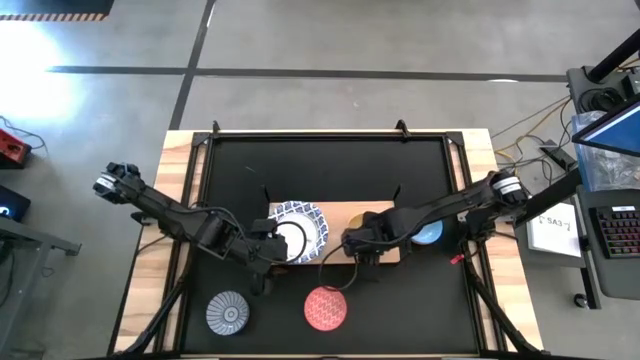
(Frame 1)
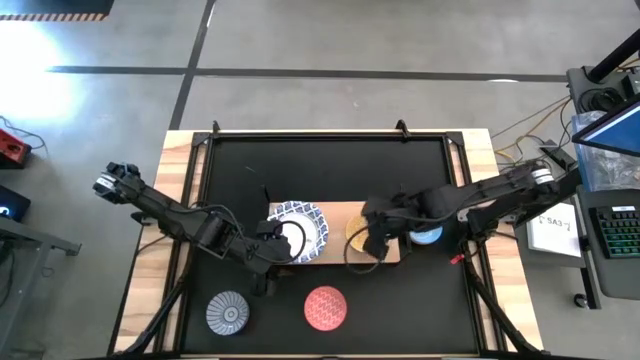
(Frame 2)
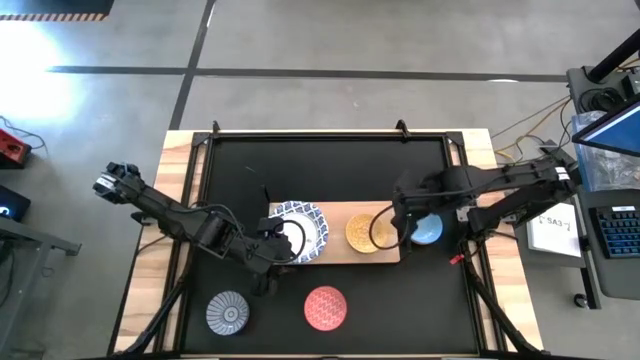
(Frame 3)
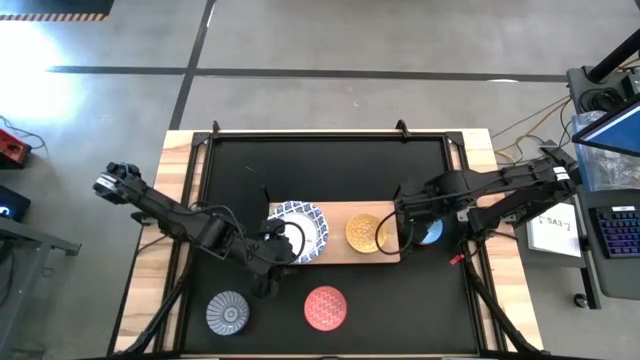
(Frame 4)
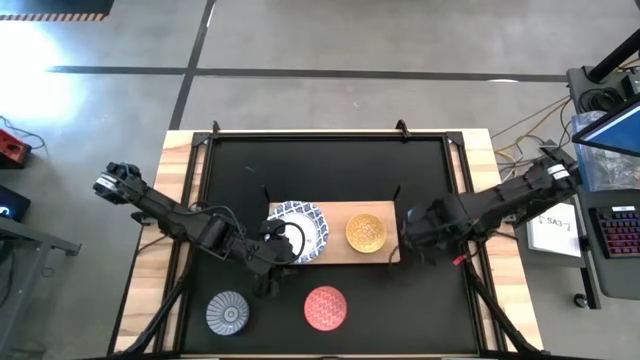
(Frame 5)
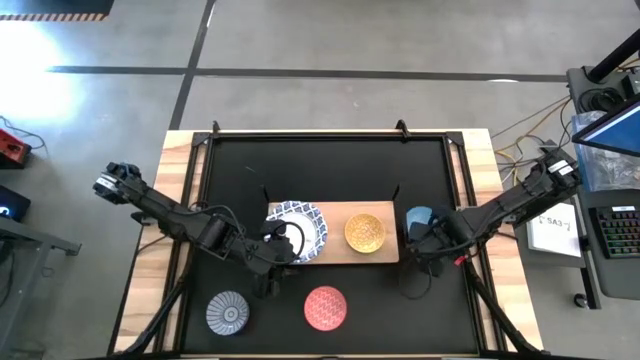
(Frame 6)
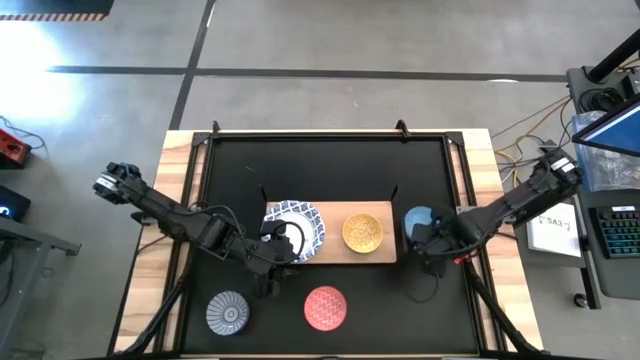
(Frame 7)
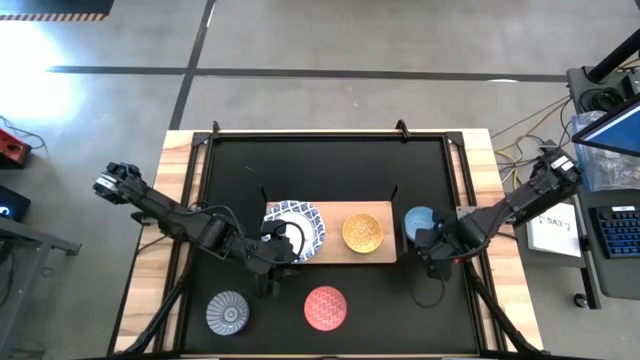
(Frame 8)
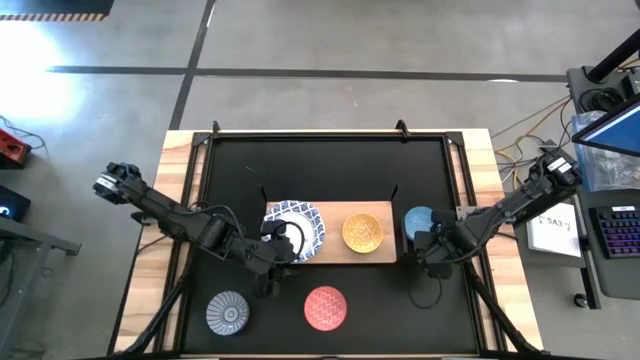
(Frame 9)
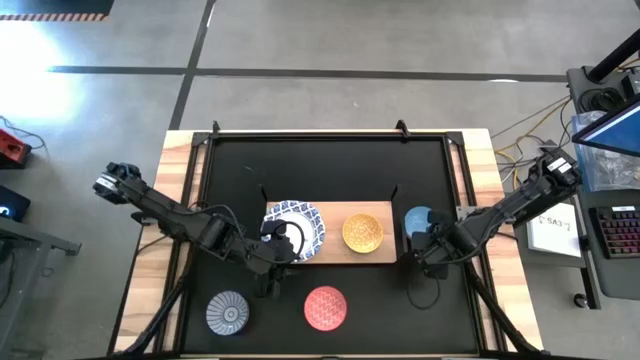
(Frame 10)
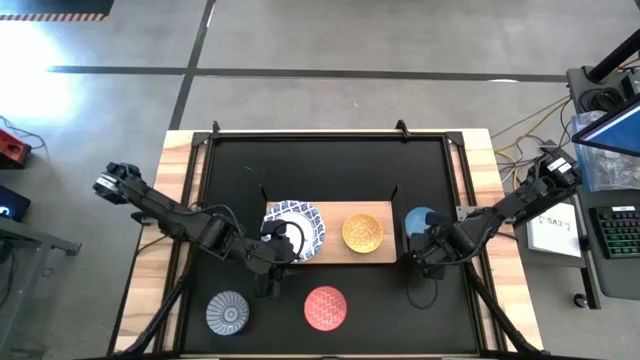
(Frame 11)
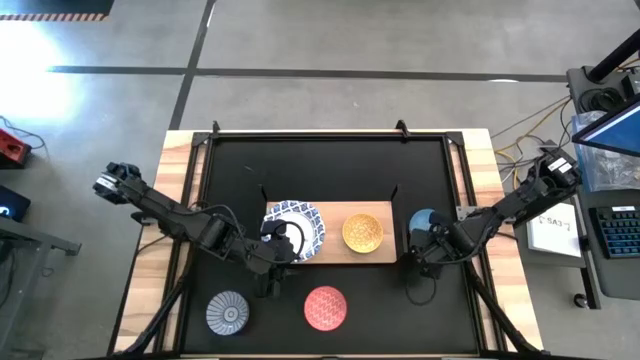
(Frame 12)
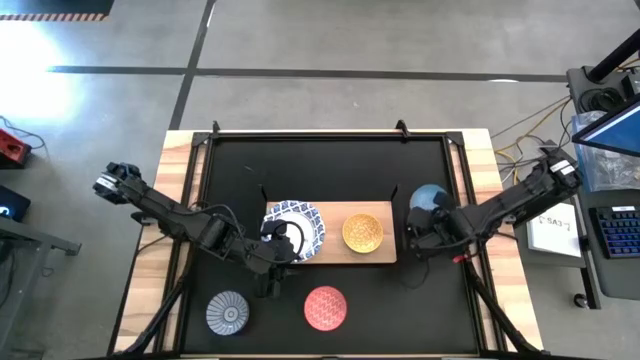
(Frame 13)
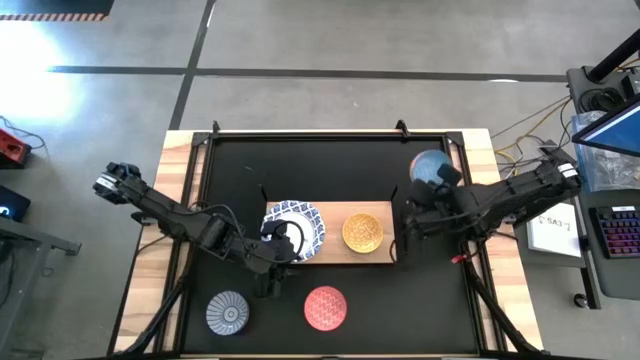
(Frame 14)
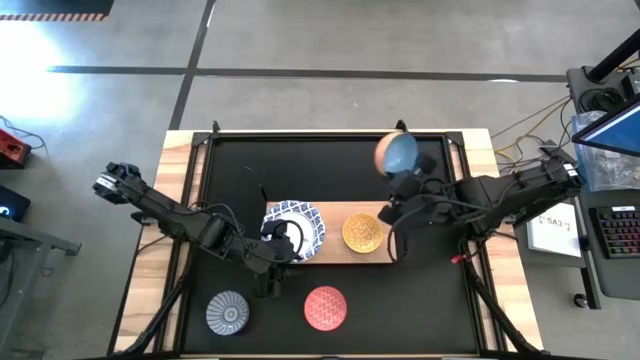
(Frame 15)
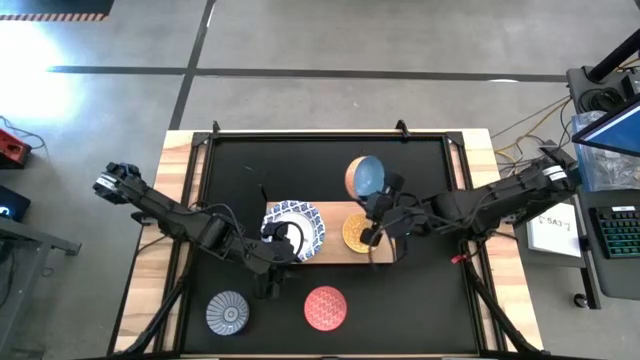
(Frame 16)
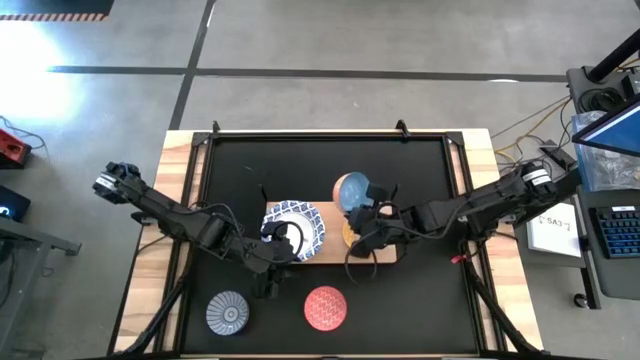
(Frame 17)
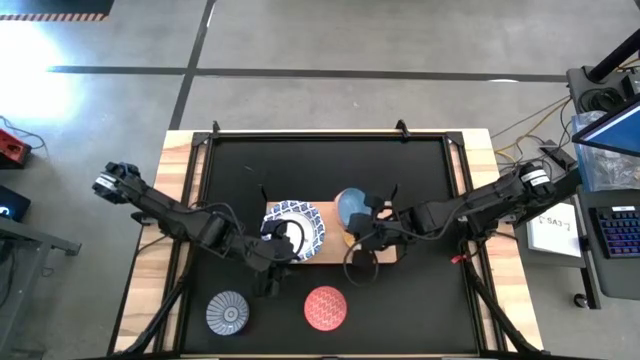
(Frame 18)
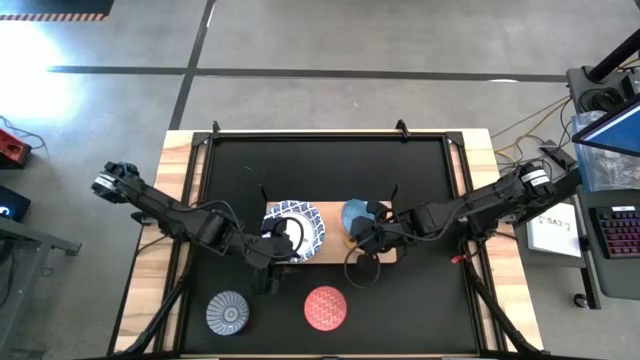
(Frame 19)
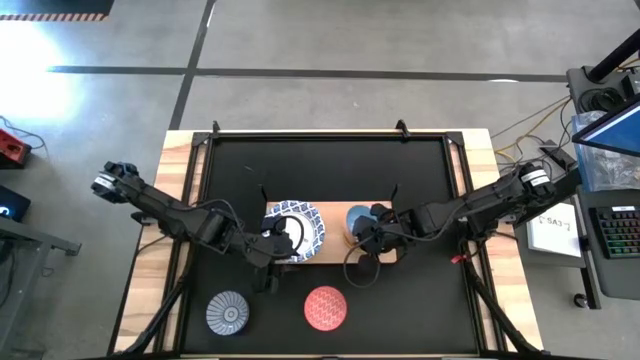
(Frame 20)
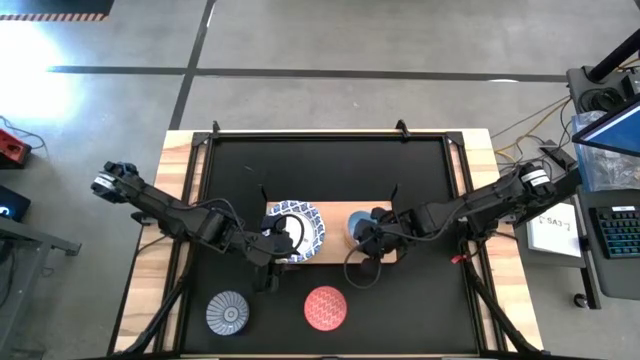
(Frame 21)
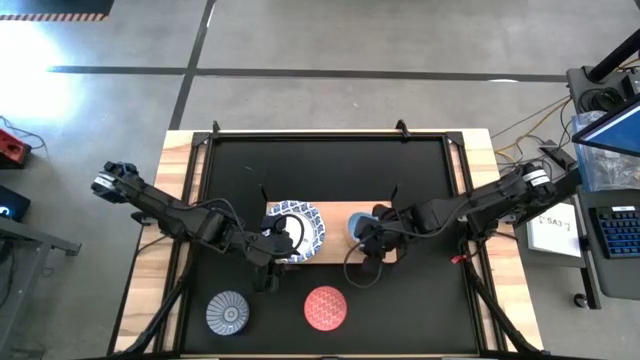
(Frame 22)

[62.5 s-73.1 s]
Task: Place and stack bowls onto a shelf
Stack the light blue patterned bowl on top of the yellow patterned bowl on the shelf

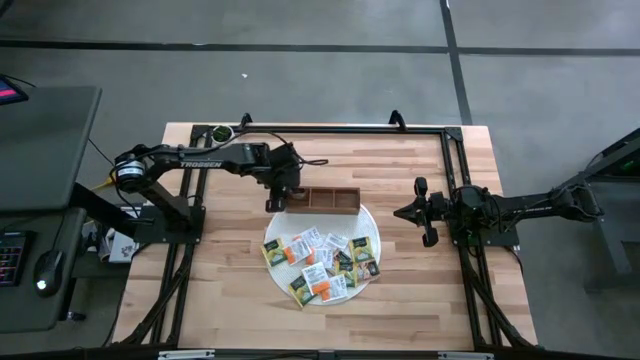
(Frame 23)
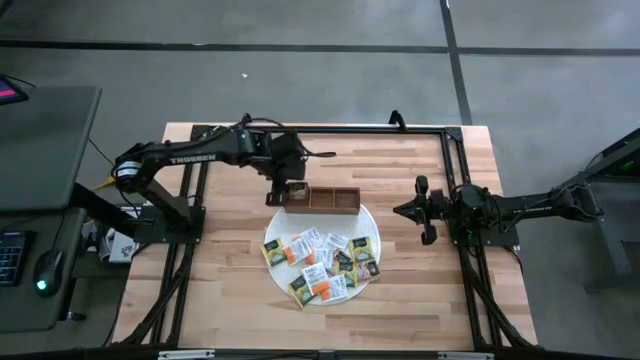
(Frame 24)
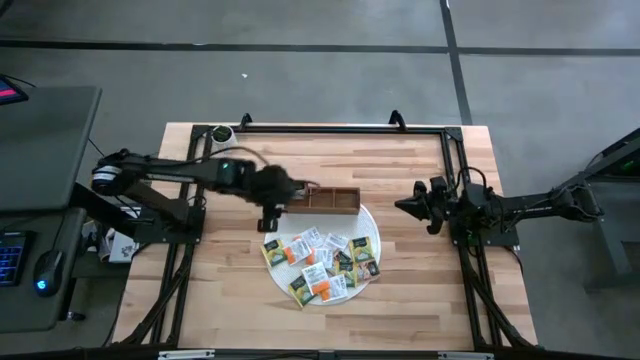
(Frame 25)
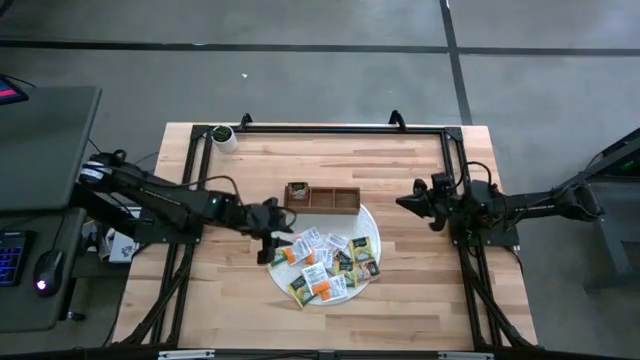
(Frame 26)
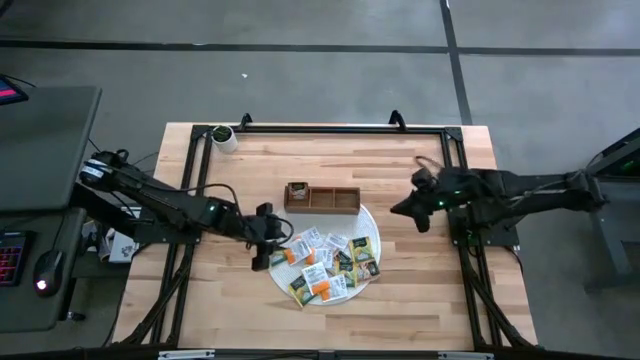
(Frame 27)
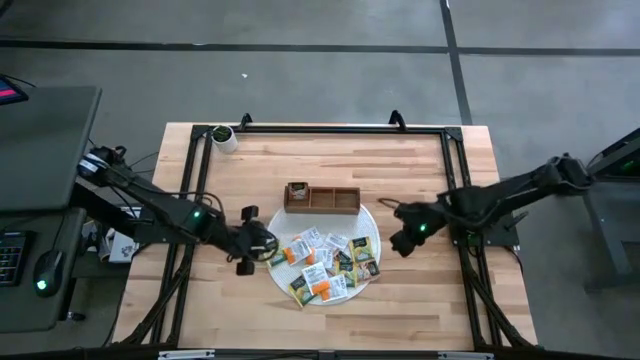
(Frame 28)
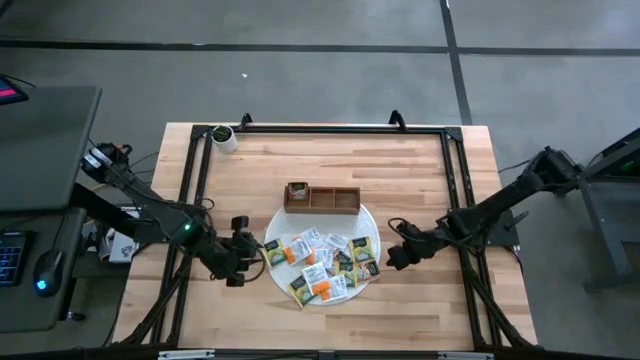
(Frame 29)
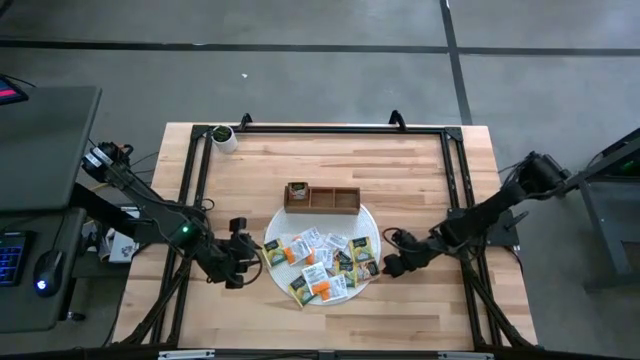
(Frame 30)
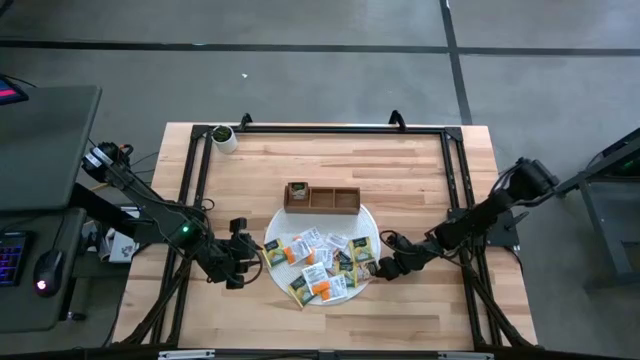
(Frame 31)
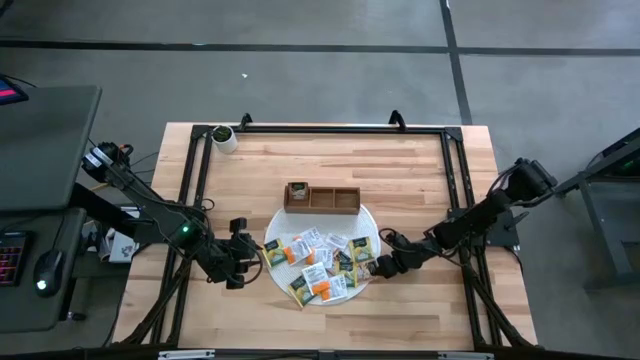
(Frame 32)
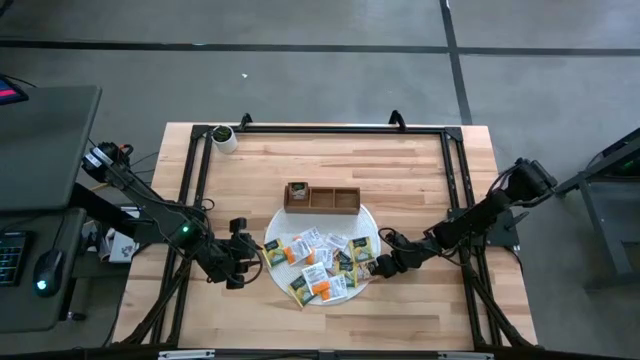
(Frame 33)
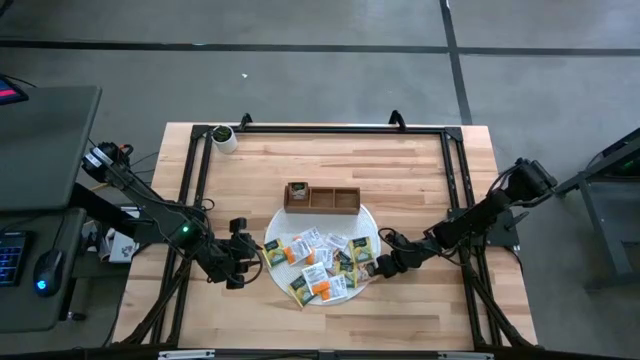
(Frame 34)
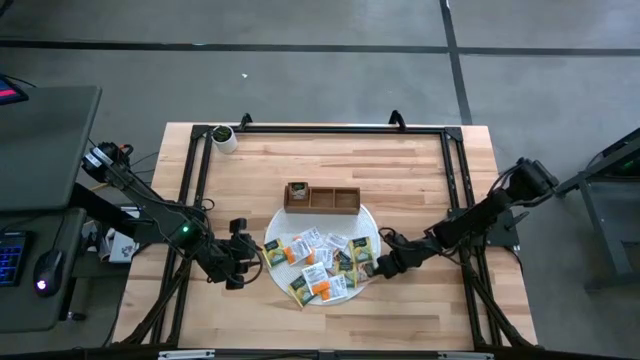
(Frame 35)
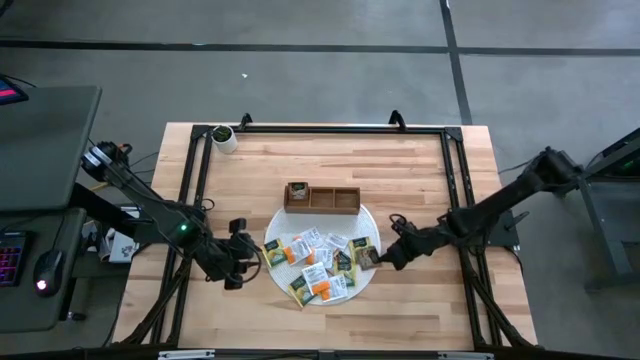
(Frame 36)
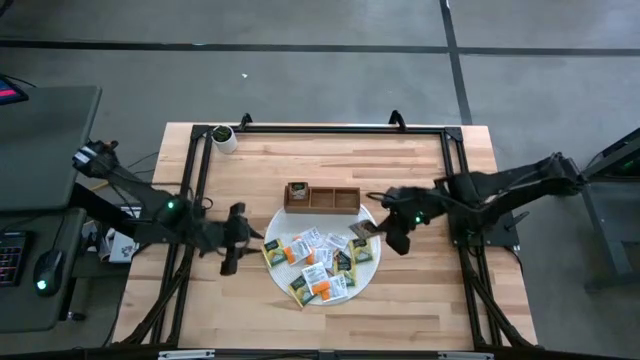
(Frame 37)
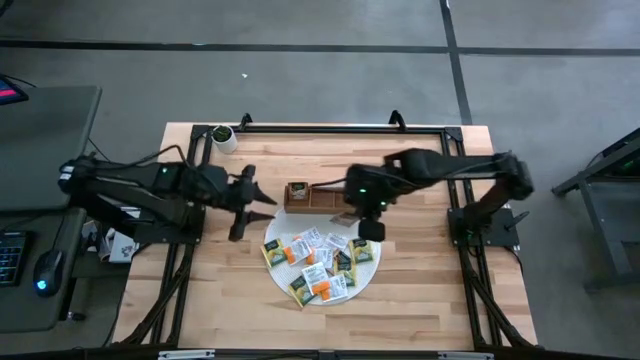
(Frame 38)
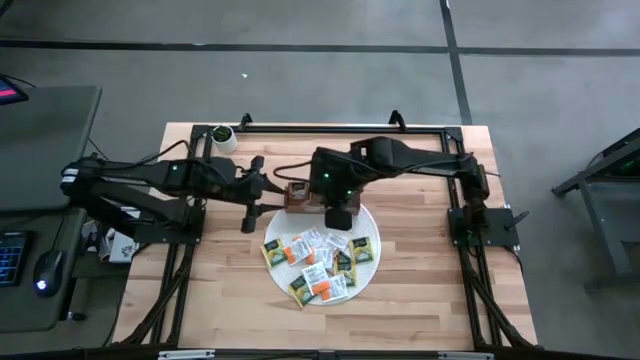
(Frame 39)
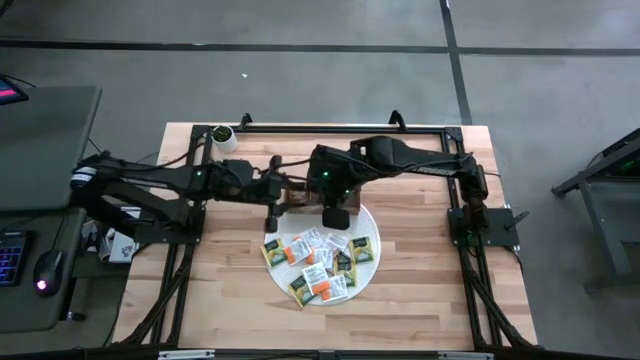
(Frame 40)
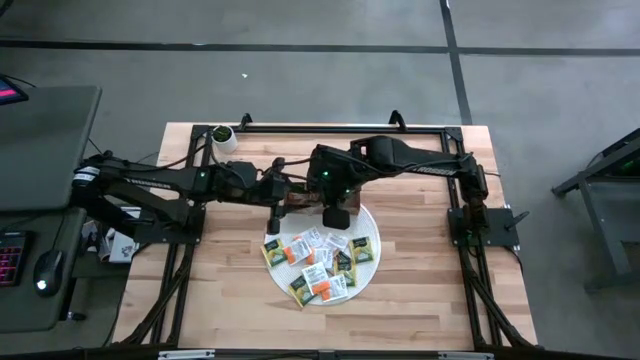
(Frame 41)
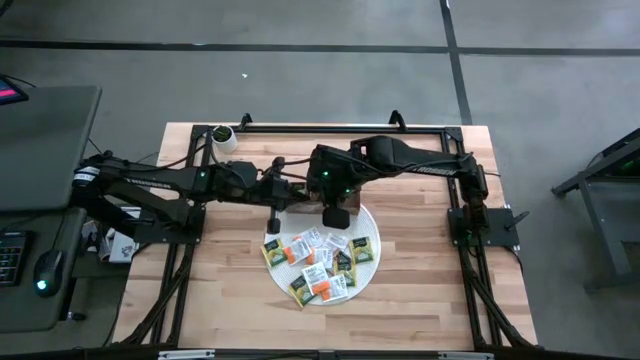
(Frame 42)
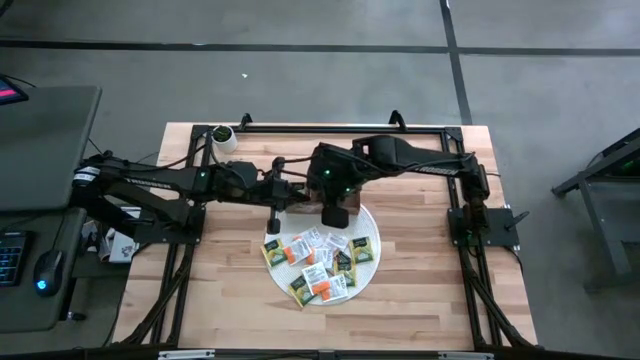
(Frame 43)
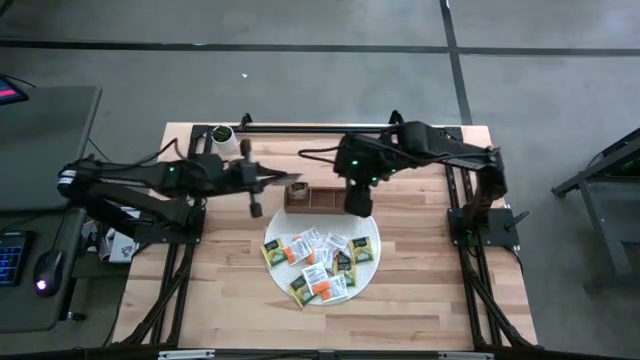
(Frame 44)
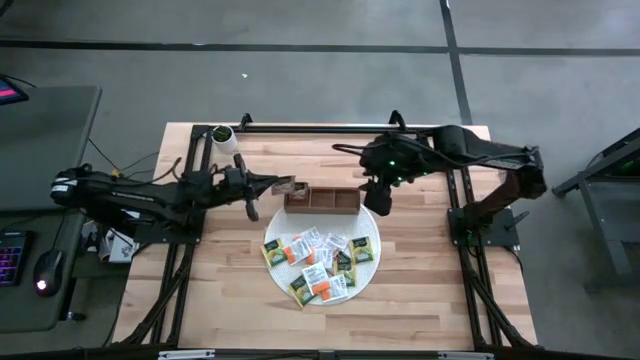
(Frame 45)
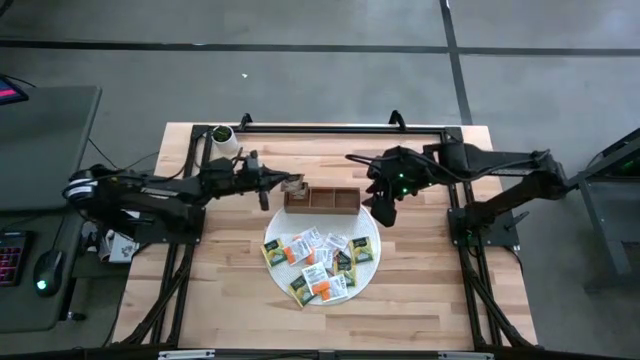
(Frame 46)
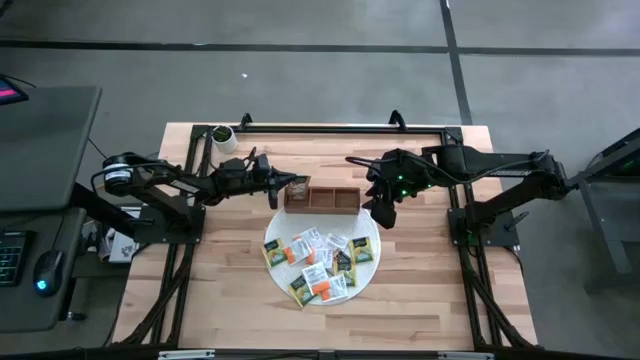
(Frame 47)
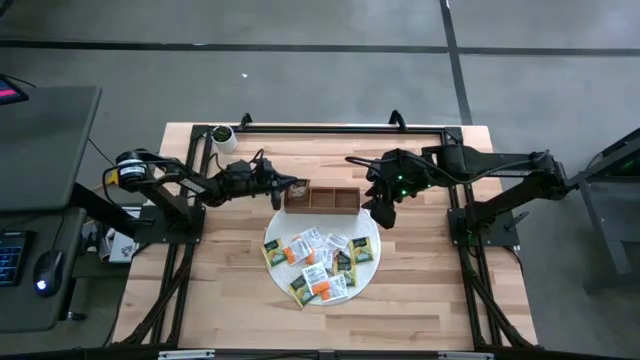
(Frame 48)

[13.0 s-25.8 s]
Task: Pick & Place Tea
Put the brown tea bag into the left section of the wooden organizer
